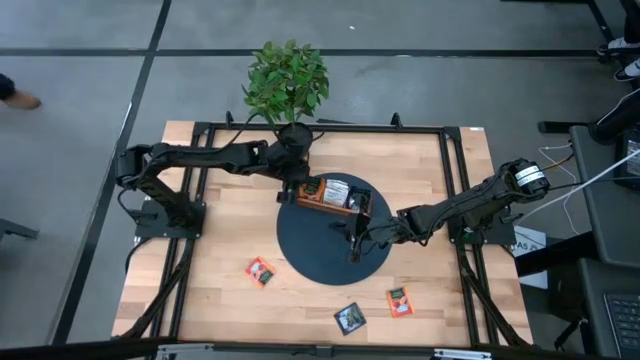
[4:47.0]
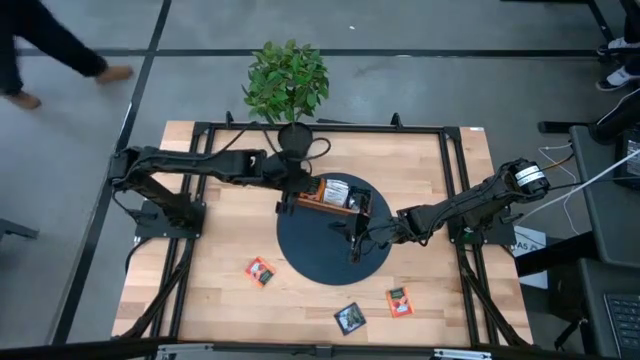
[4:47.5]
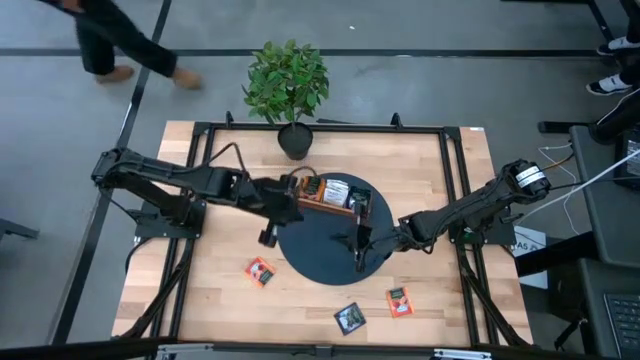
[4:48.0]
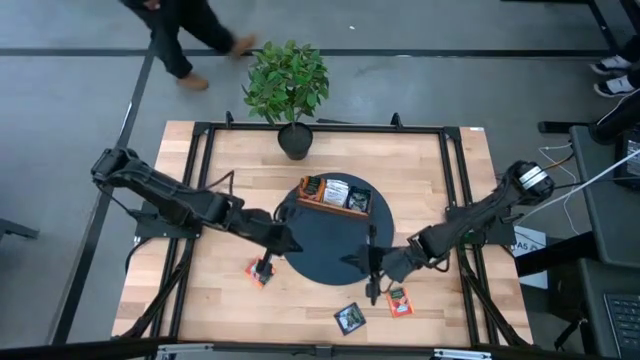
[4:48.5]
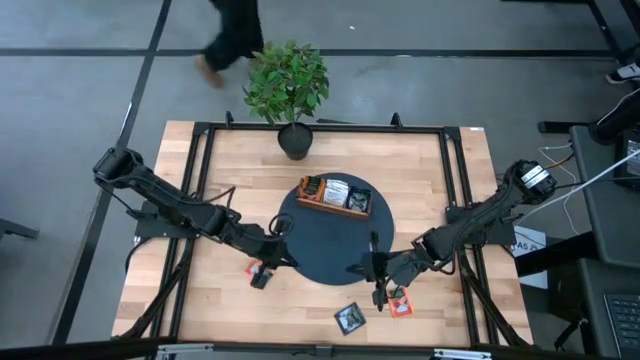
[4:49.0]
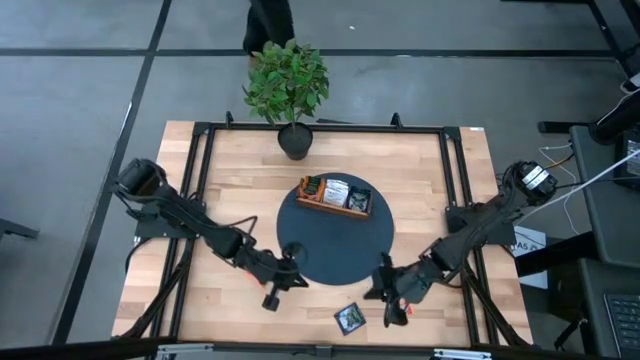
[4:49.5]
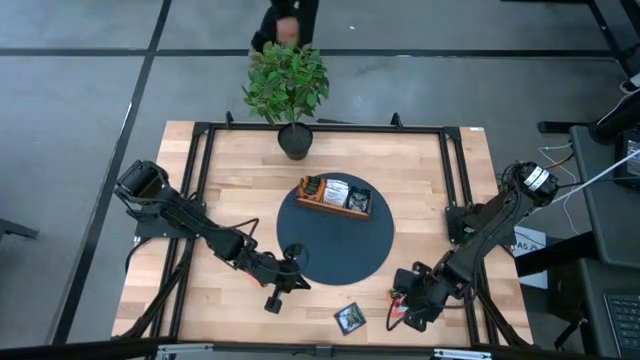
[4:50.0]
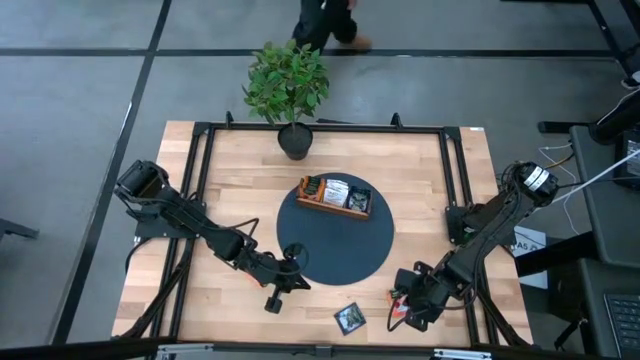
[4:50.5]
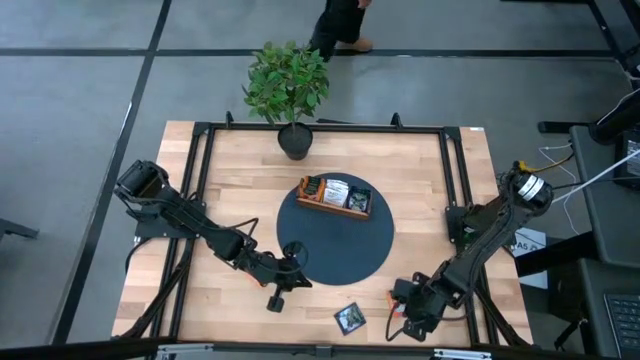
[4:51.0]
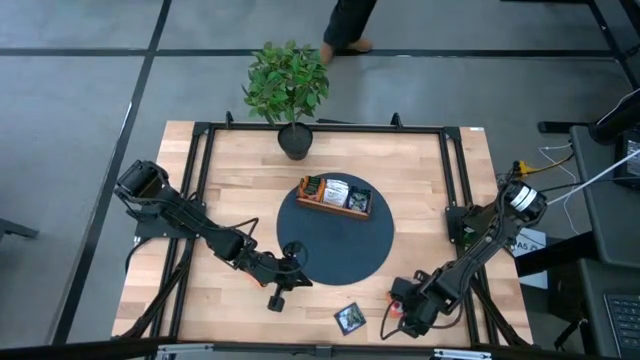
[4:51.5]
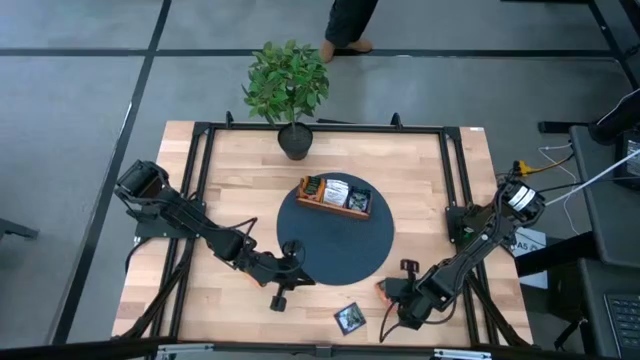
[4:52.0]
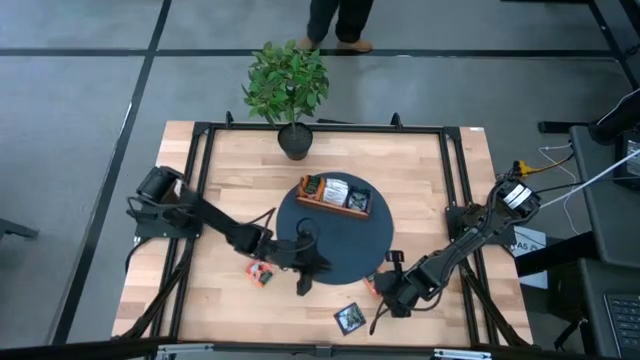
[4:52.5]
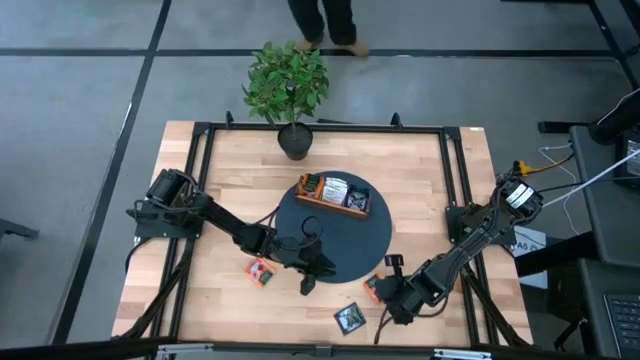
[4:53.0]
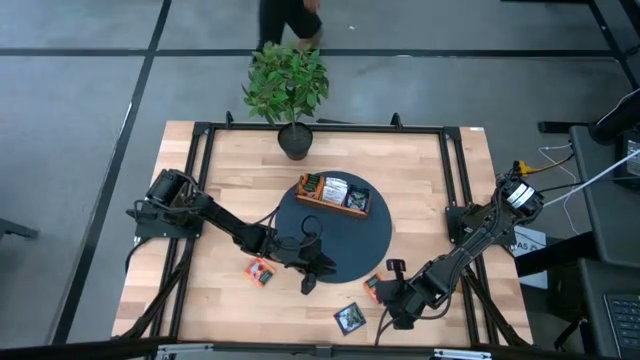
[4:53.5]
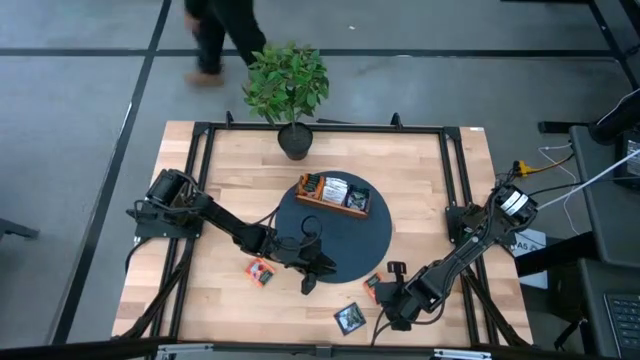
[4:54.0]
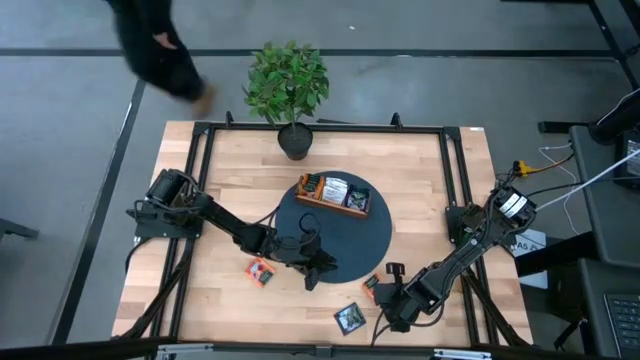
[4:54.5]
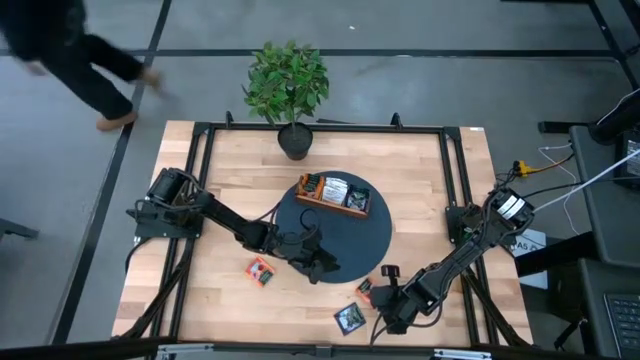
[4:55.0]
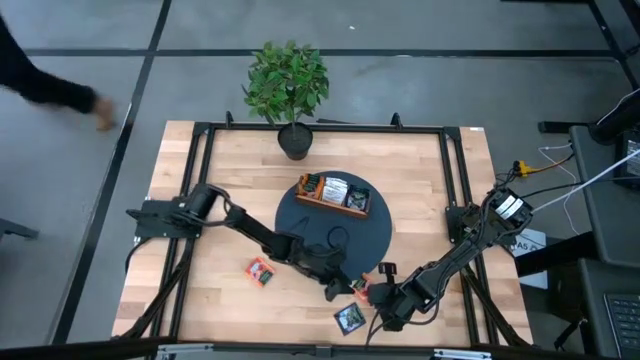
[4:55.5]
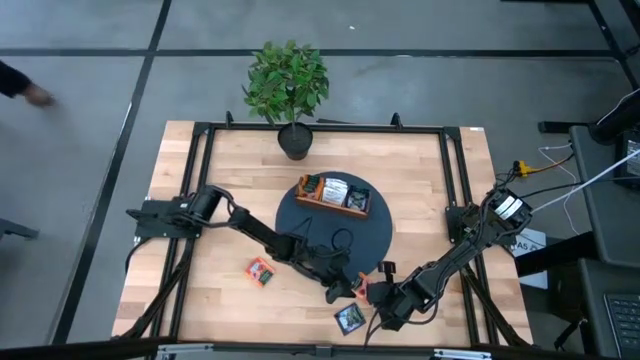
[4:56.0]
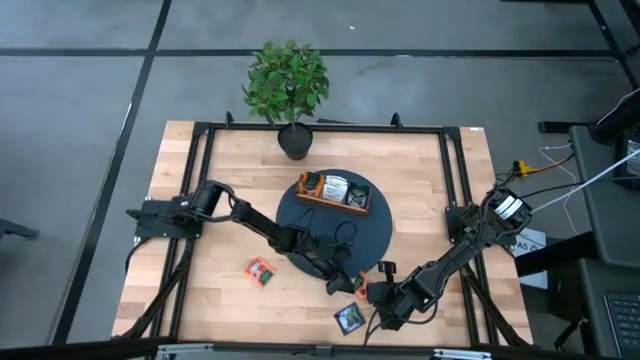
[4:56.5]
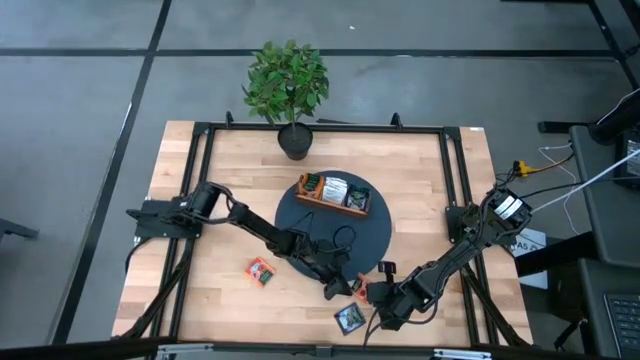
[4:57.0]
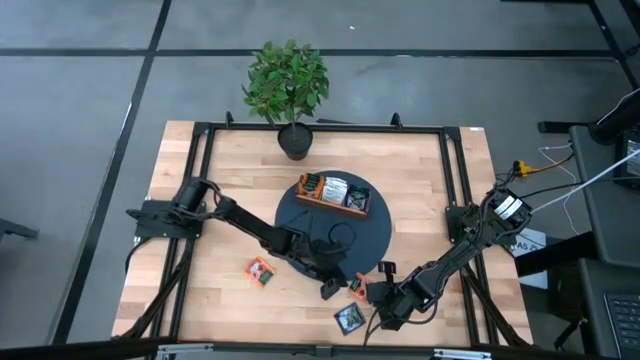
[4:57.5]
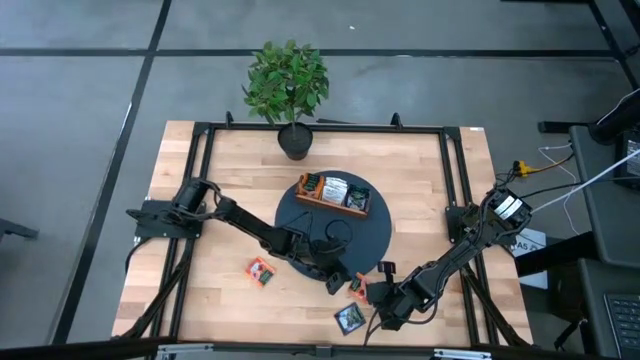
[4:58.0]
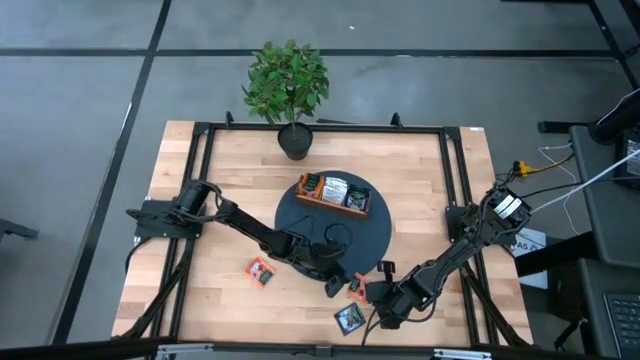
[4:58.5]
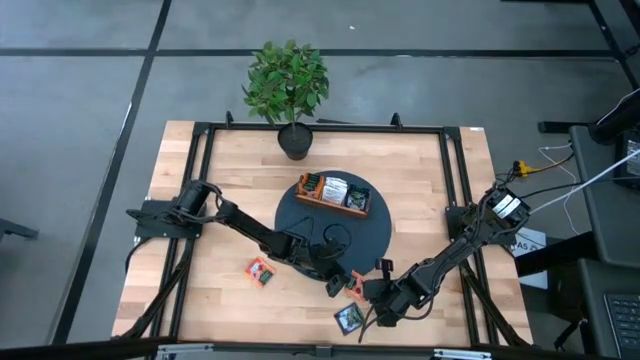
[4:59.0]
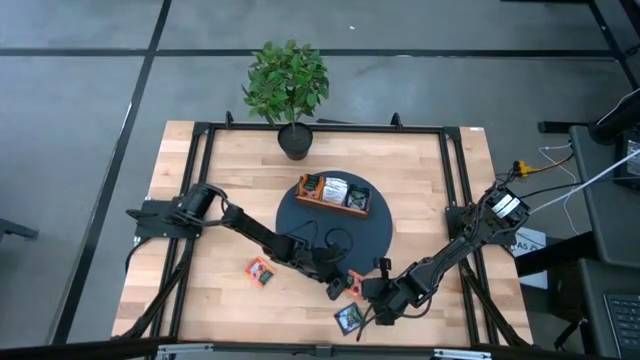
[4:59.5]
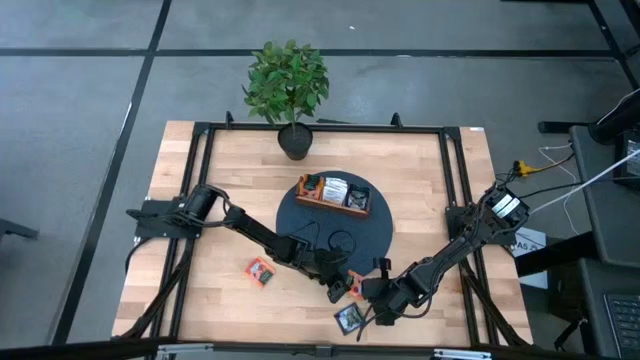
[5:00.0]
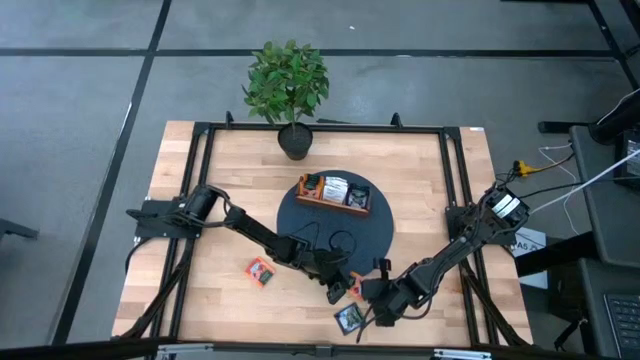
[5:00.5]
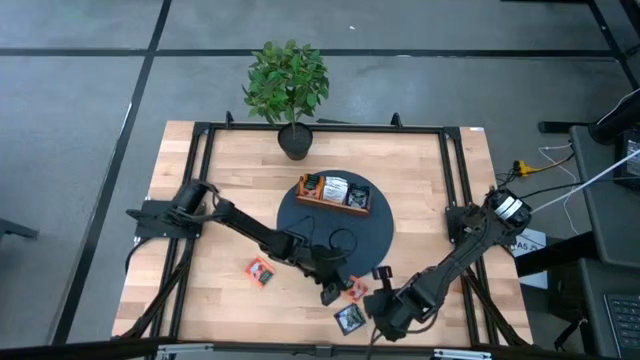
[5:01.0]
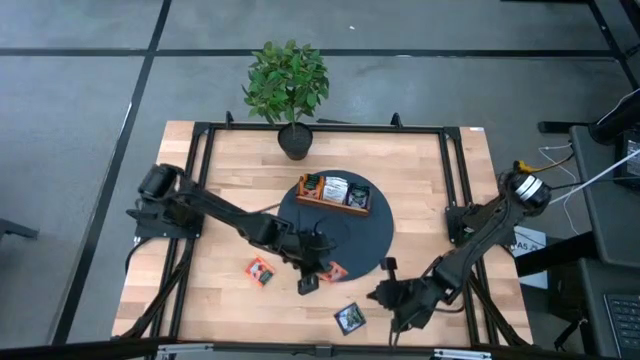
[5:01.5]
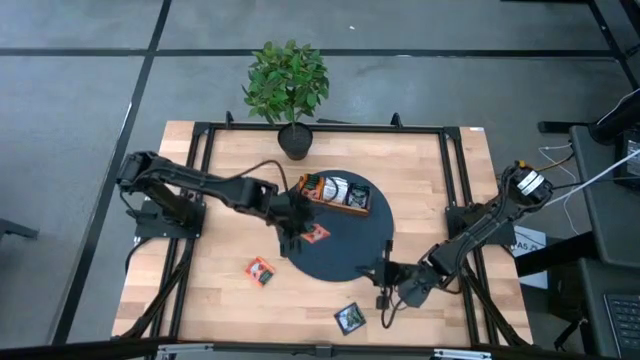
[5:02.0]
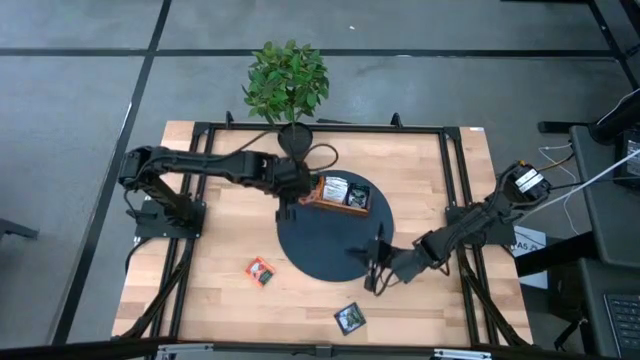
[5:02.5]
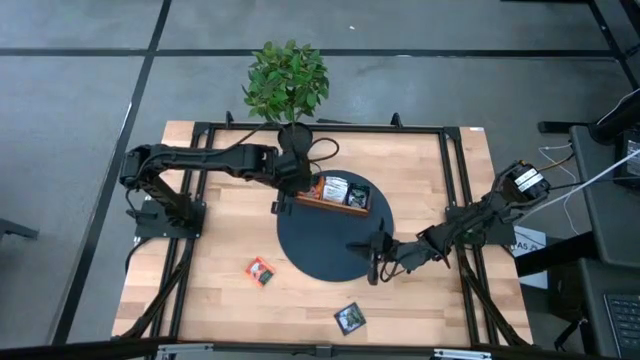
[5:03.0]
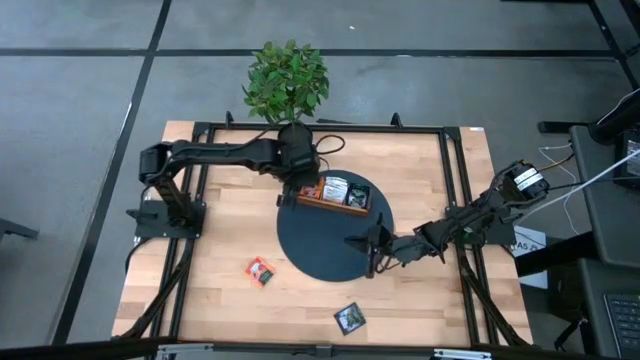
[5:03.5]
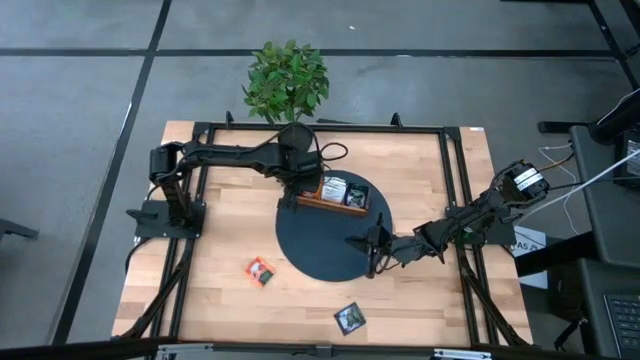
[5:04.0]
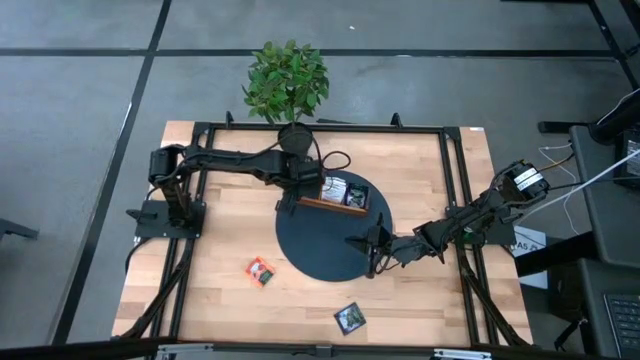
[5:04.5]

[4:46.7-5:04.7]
Task: Pick & Place Tea
Put the orange tea bag into the left side of the wooden organizer

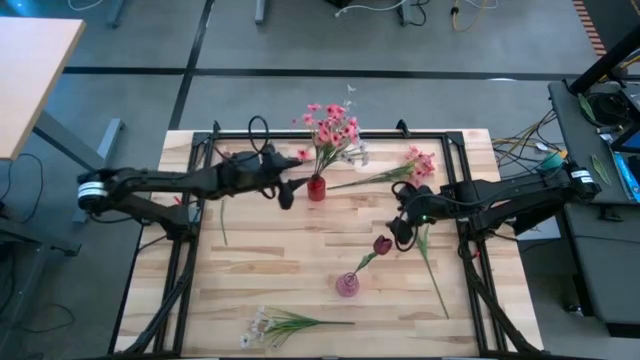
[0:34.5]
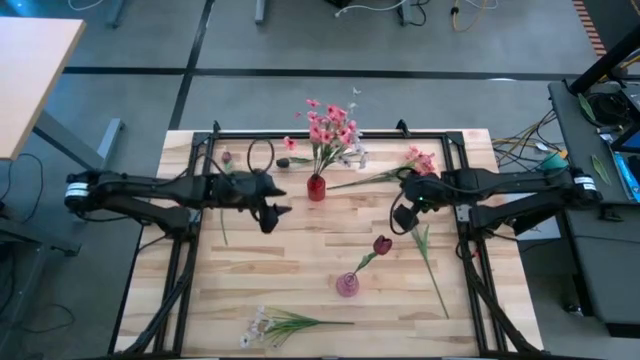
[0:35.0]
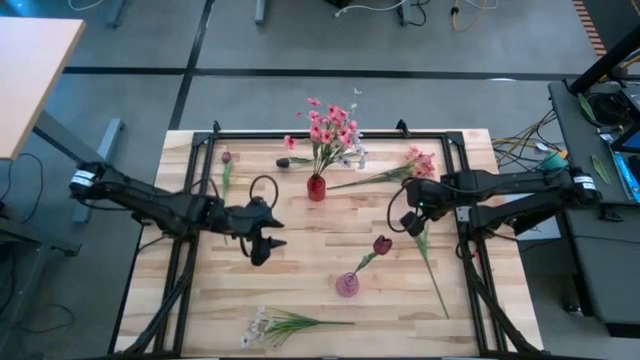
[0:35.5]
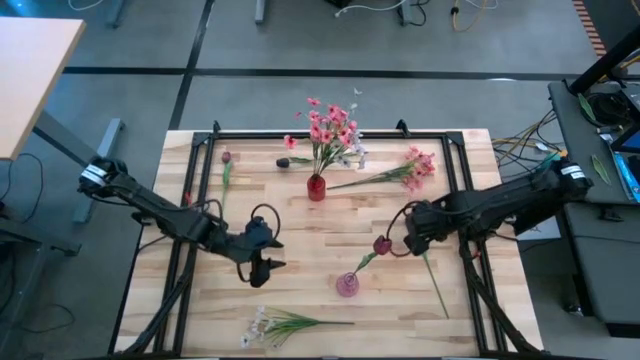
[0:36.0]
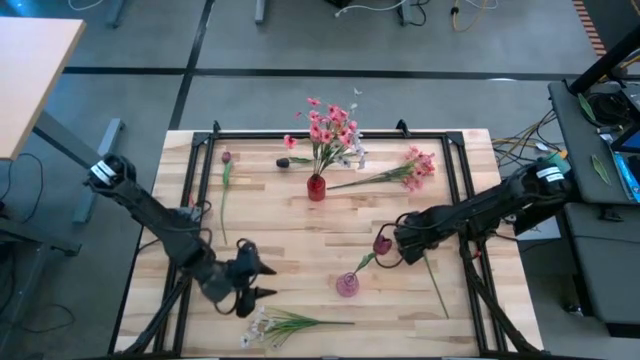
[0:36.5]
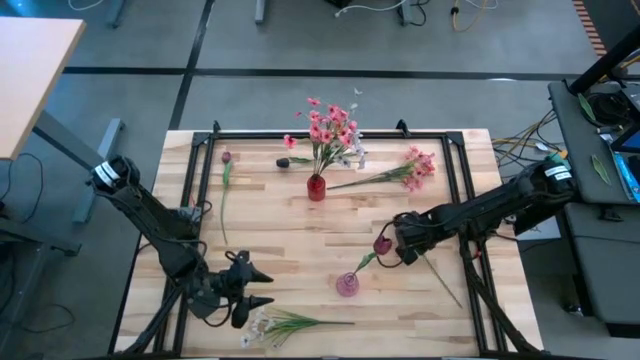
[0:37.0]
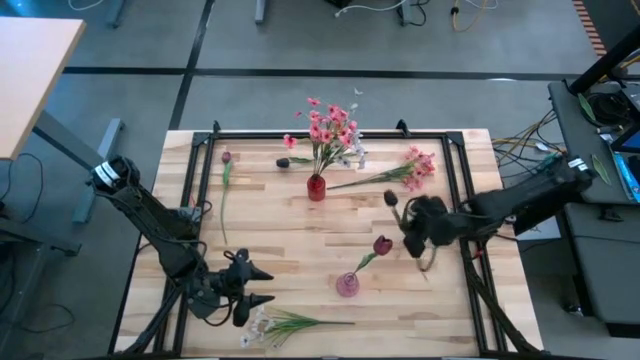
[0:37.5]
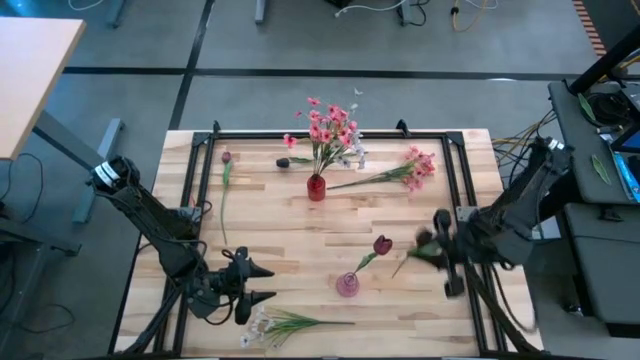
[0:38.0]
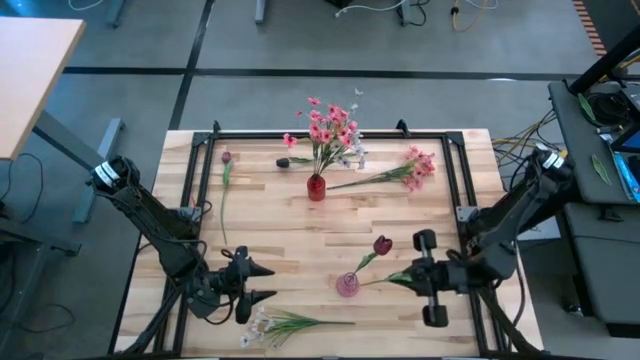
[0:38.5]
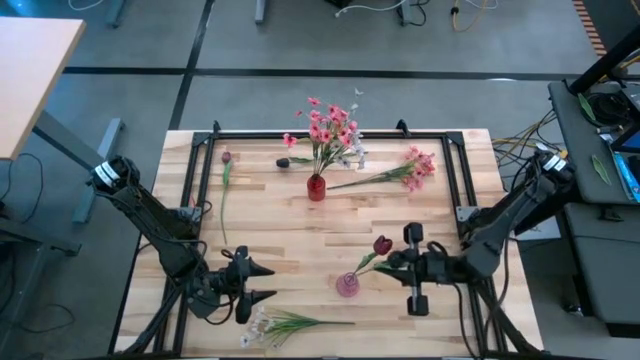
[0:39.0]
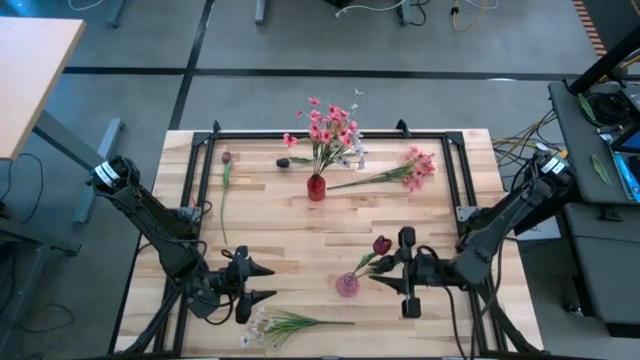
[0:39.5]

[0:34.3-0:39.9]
Task: Sort flowers into vase by color
Put the black flower into the purple vase
